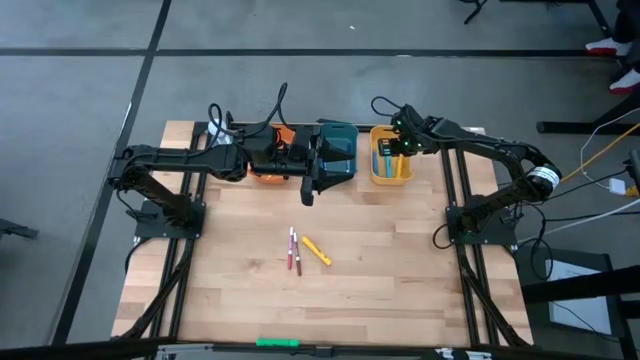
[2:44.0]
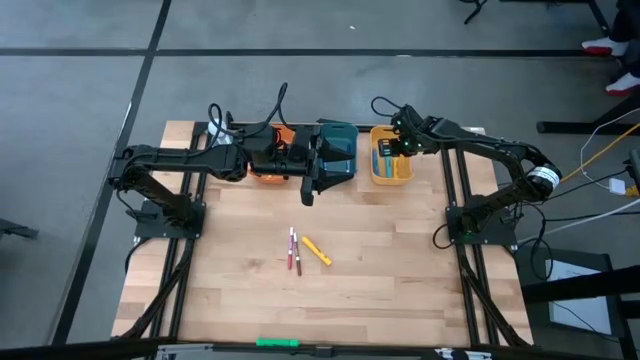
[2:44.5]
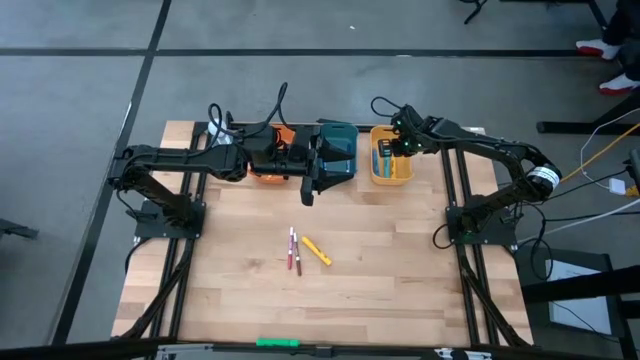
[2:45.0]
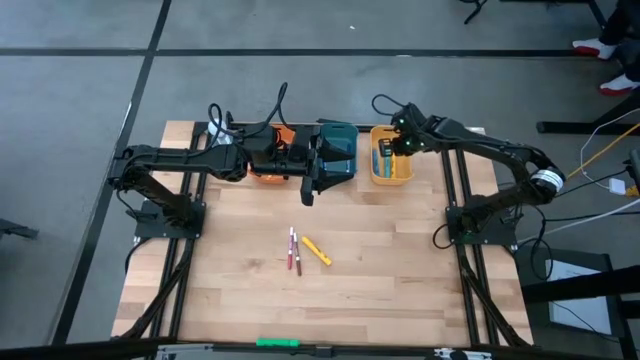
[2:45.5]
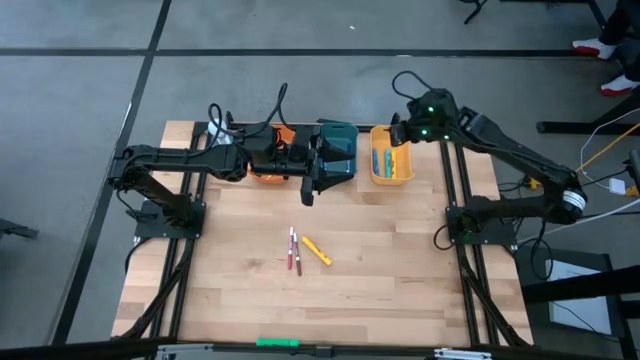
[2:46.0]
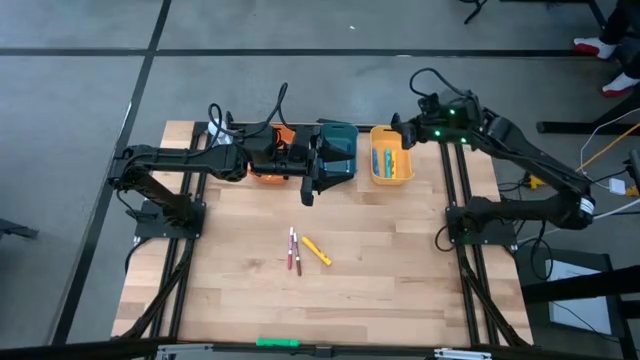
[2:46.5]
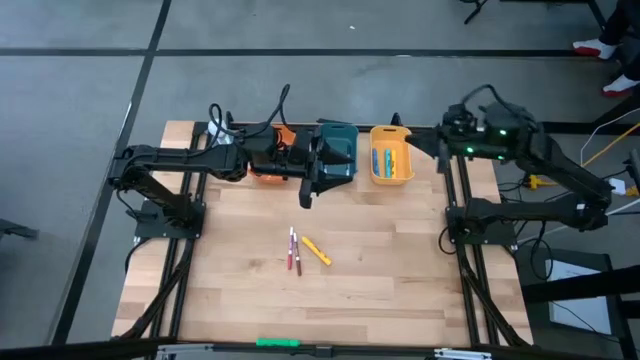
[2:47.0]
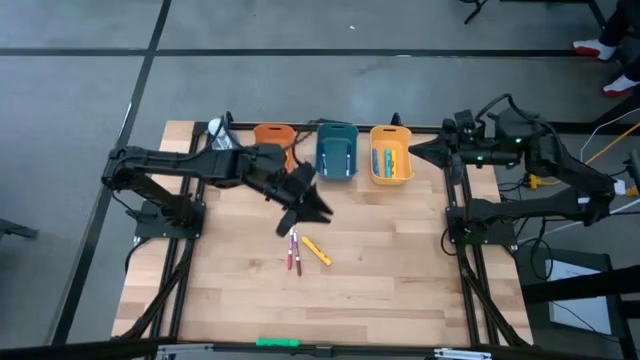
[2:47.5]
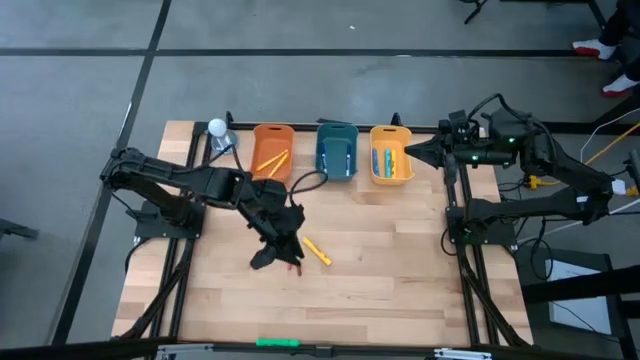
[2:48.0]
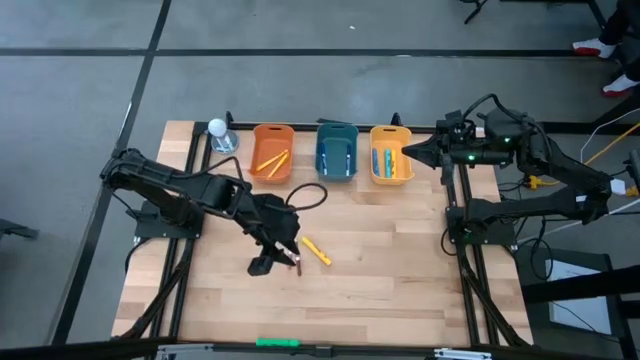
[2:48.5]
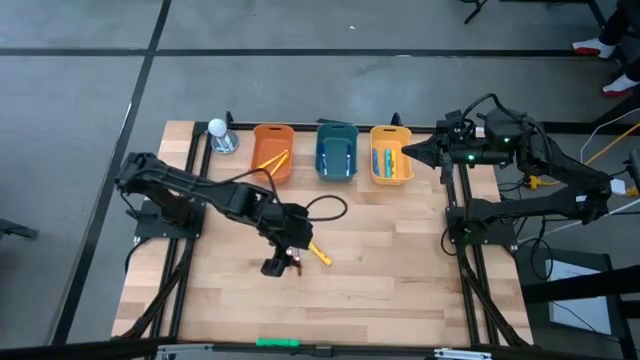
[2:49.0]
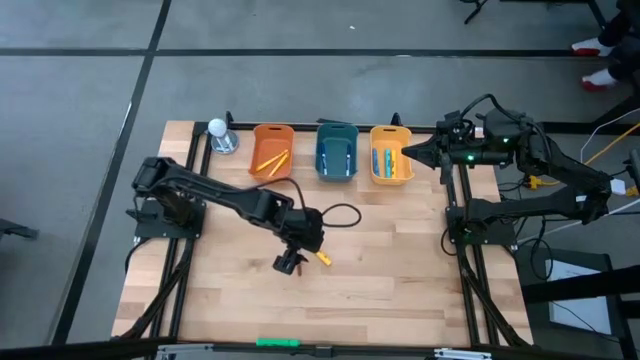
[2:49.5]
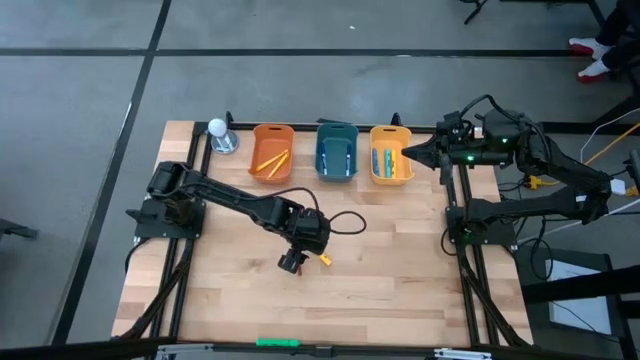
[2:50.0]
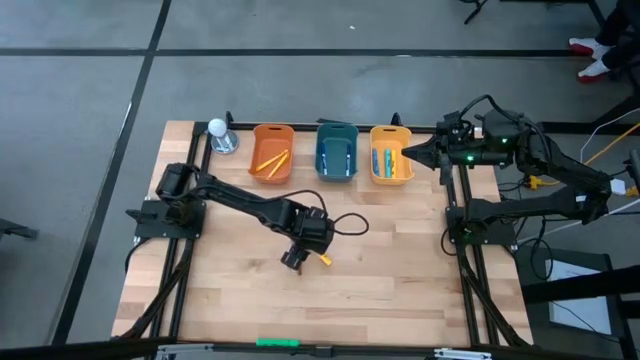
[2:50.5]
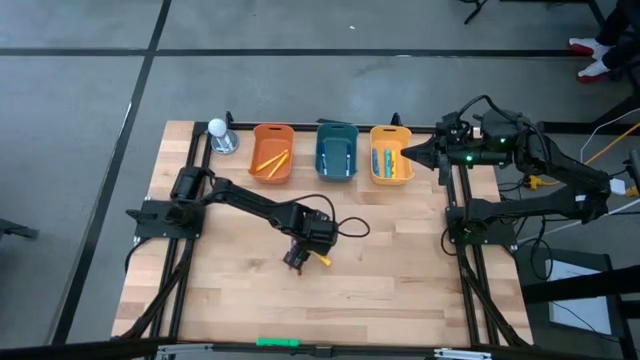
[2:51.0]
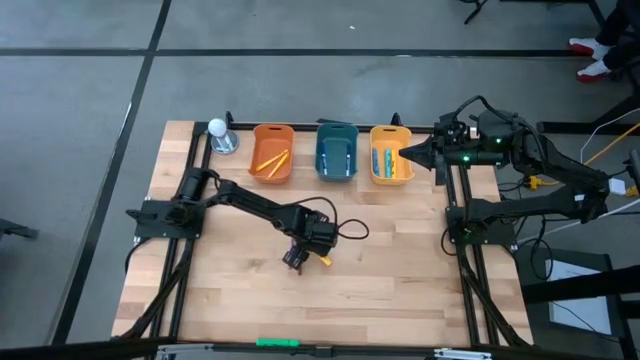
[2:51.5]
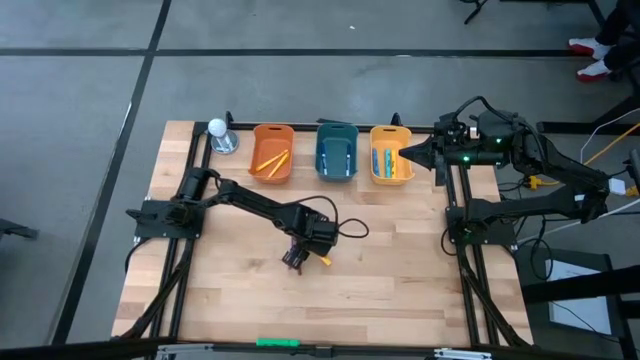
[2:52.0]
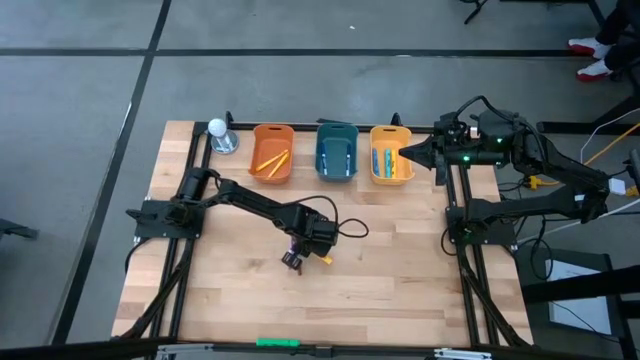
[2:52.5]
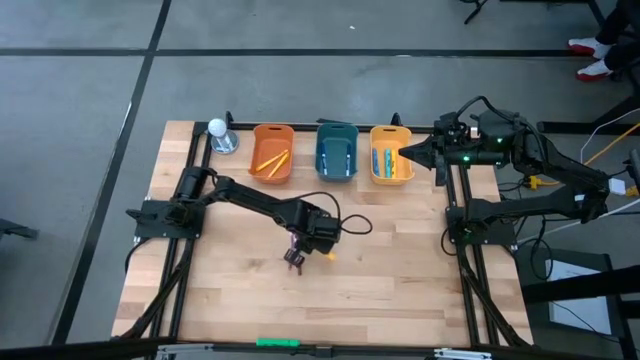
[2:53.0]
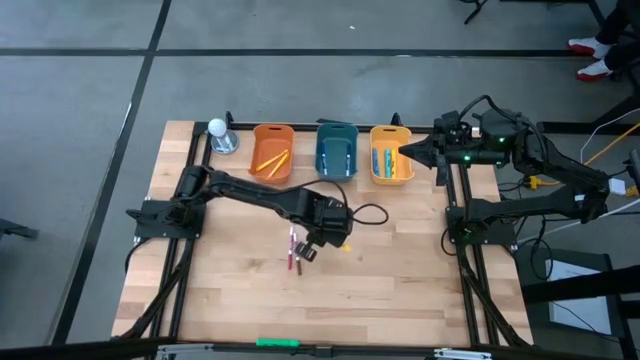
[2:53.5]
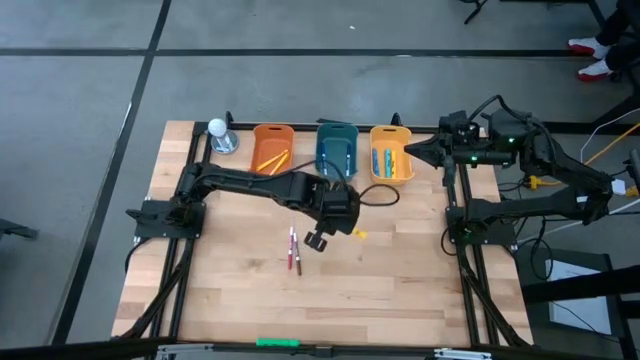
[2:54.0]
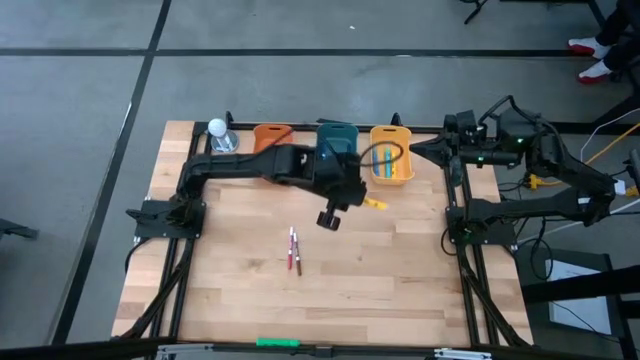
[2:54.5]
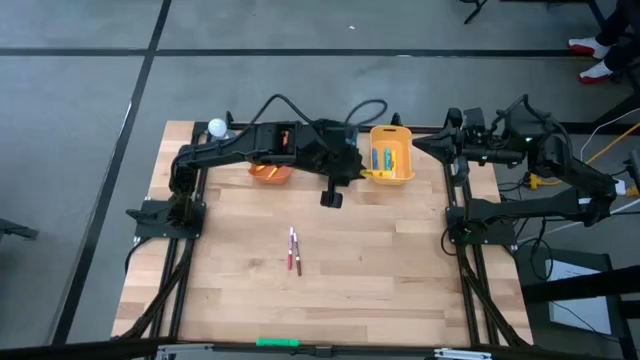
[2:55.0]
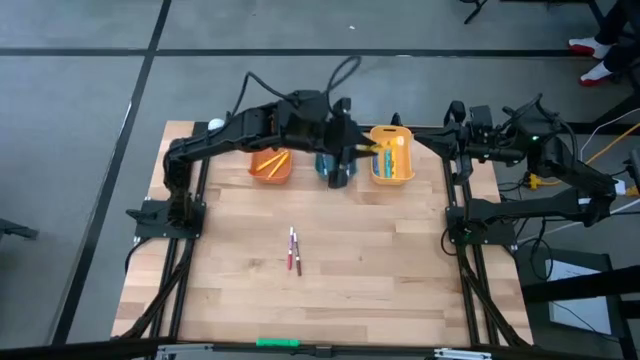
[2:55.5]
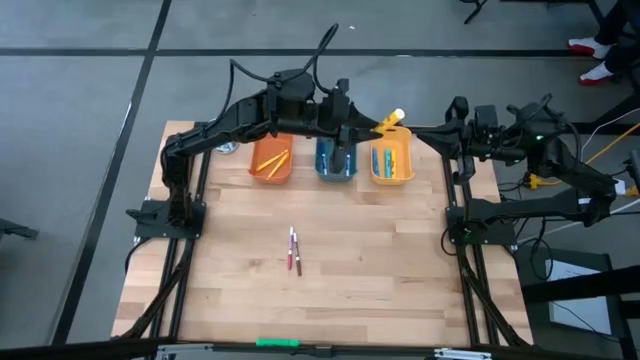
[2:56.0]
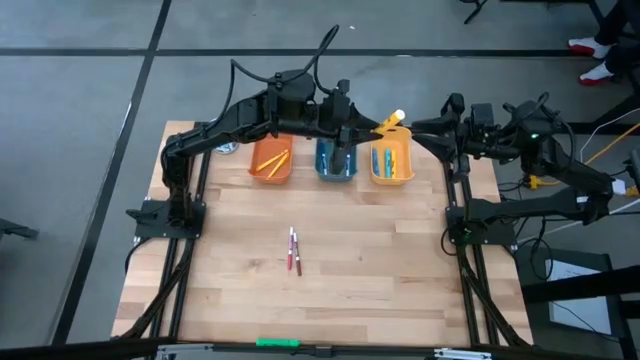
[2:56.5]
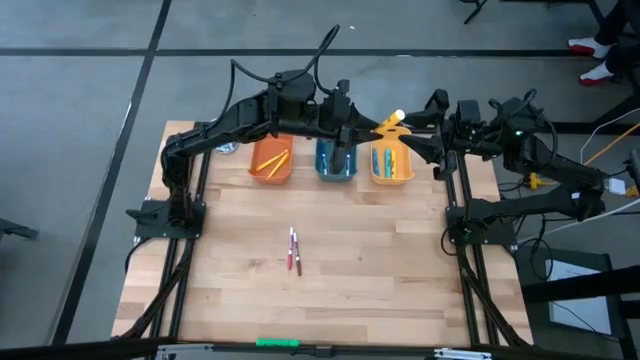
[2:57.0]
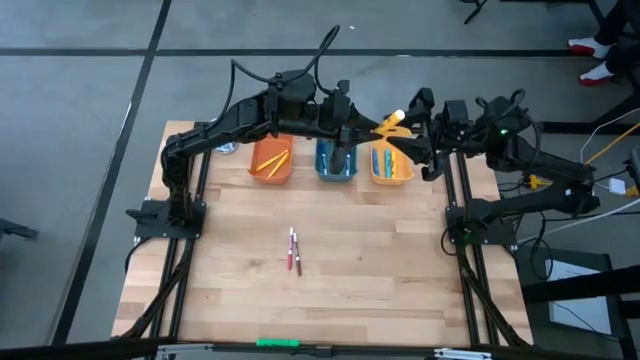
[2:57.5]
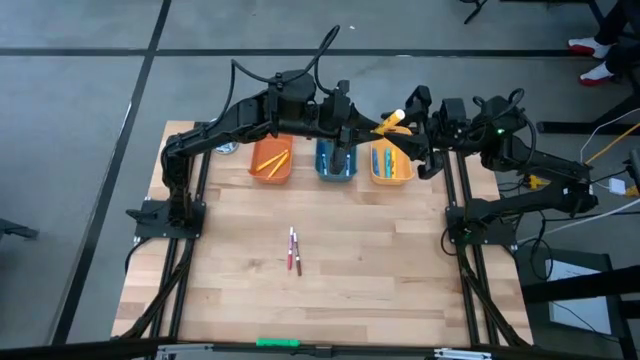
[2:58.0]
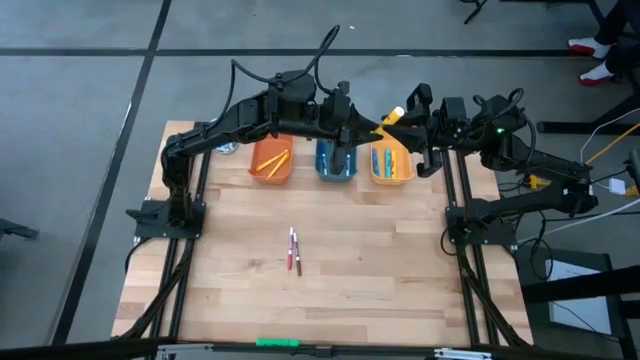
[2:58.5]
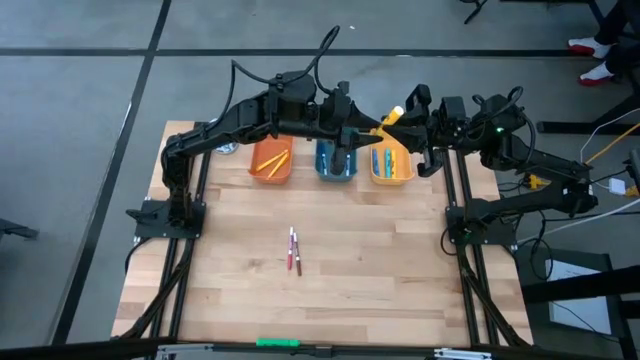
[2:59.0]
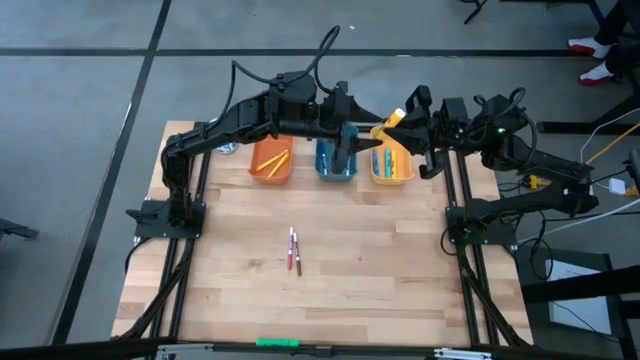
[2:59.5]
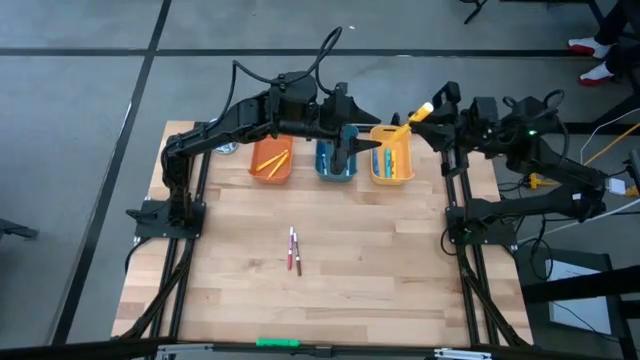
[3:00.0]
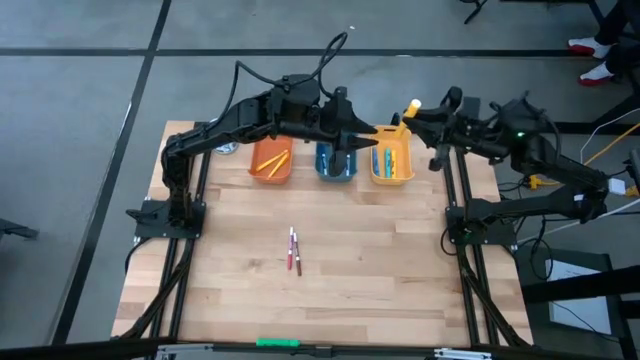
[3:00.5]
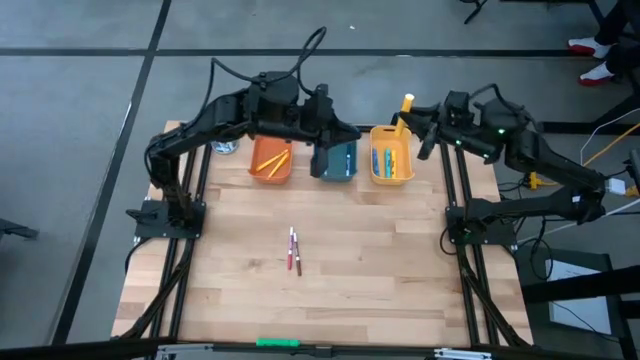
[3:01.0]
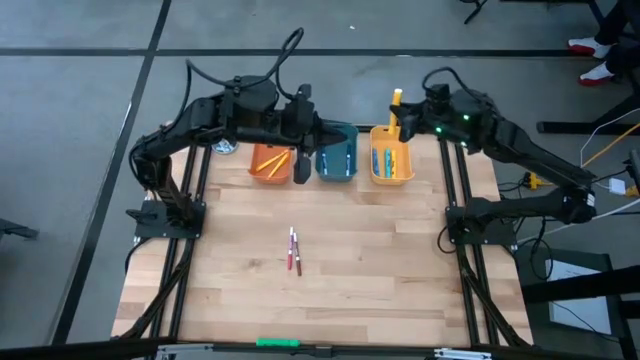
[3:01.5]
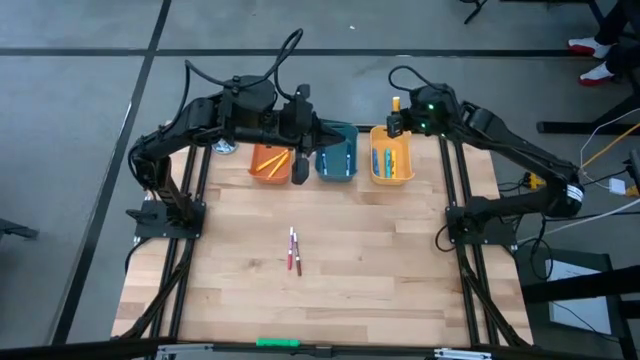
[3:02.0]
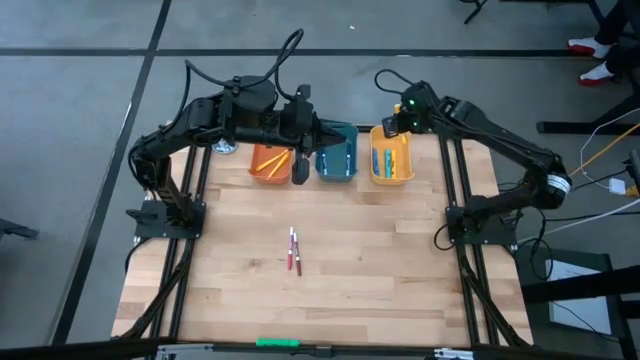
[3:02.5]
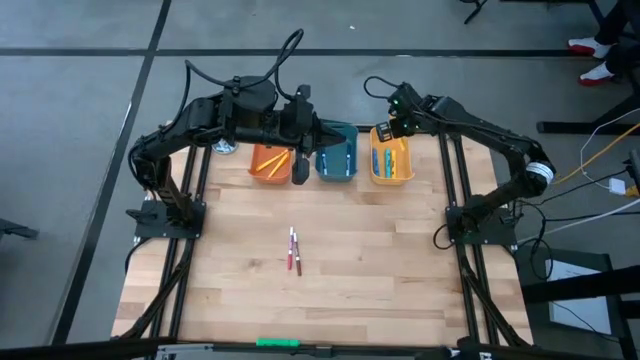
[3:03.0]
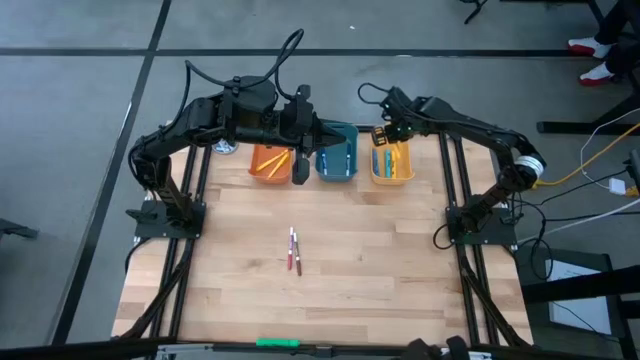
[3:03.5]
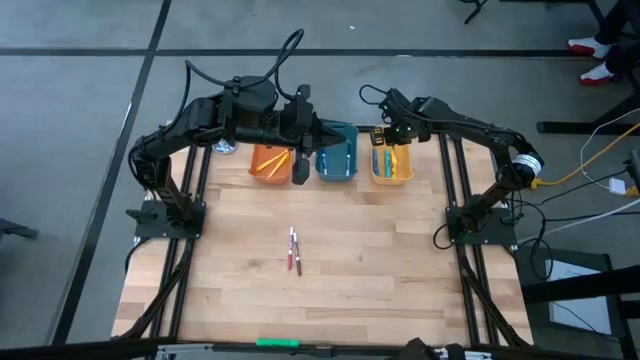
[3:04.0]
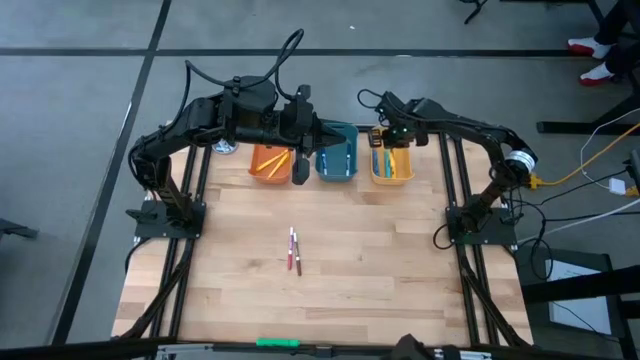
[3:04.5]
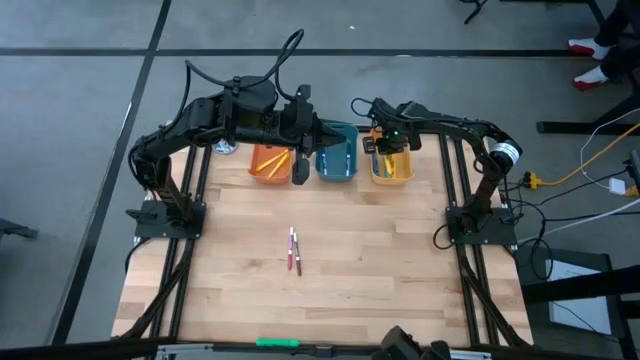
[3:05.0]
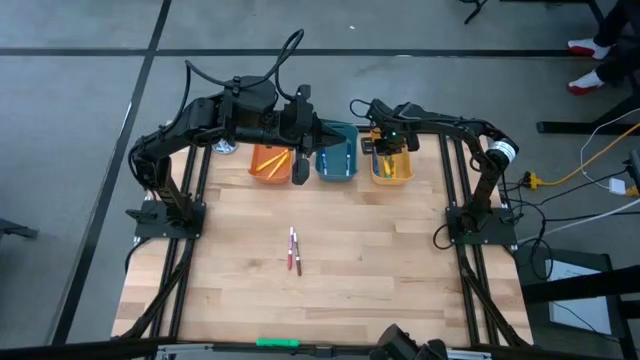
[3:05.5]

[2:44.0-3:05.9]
Task: Pick & Place Markers
Put the yellow highlighter pen into the yellow bin
